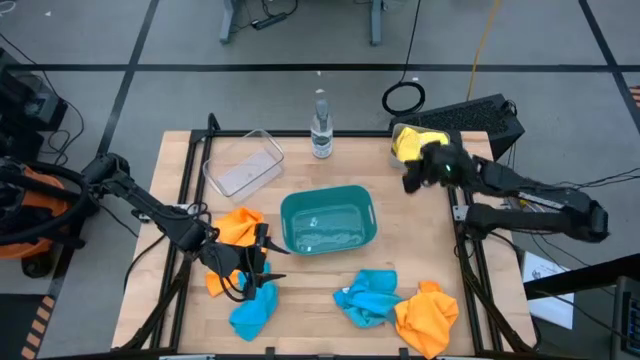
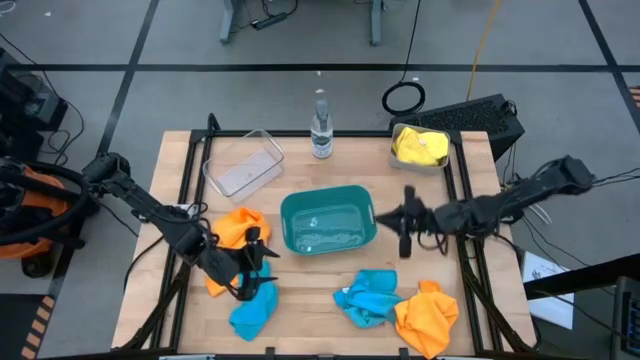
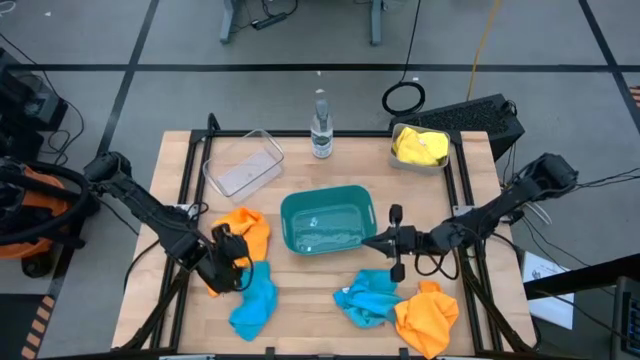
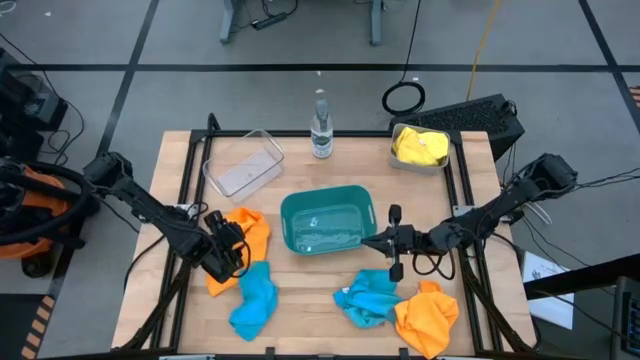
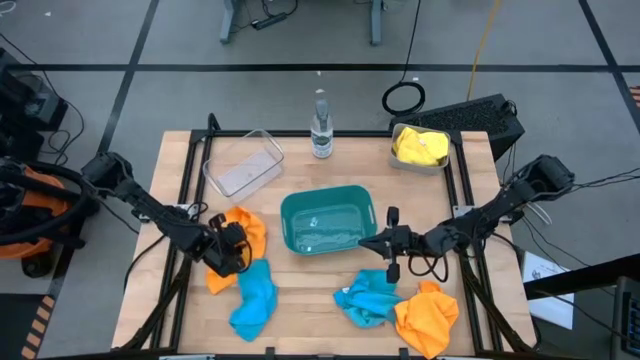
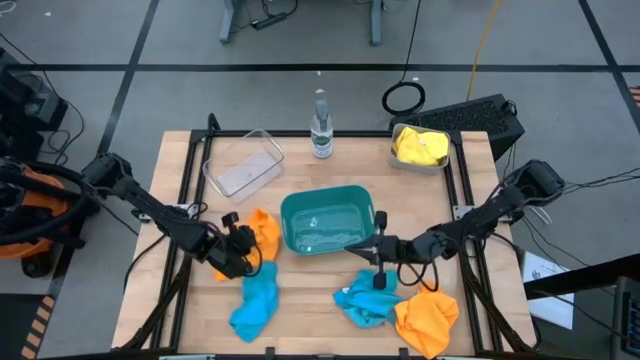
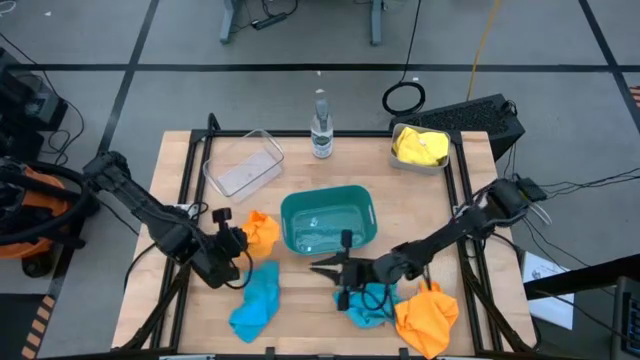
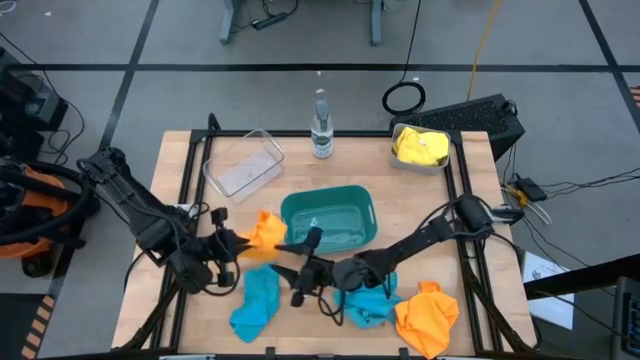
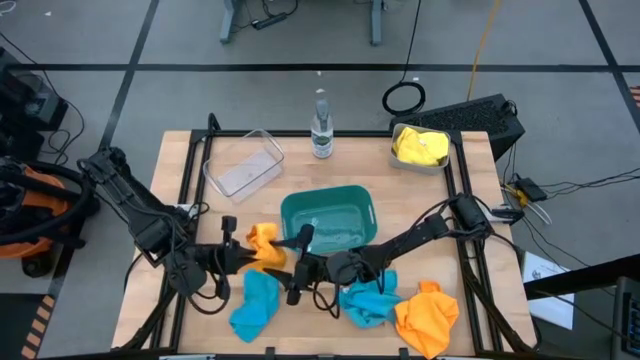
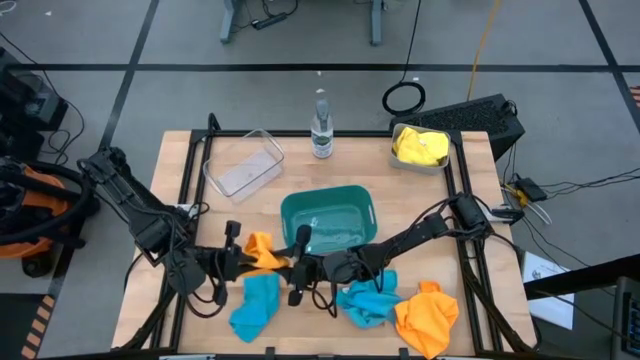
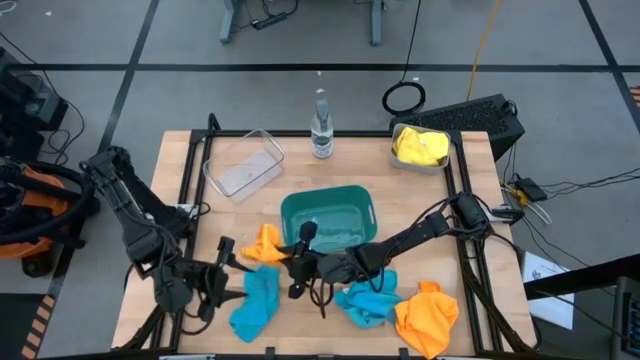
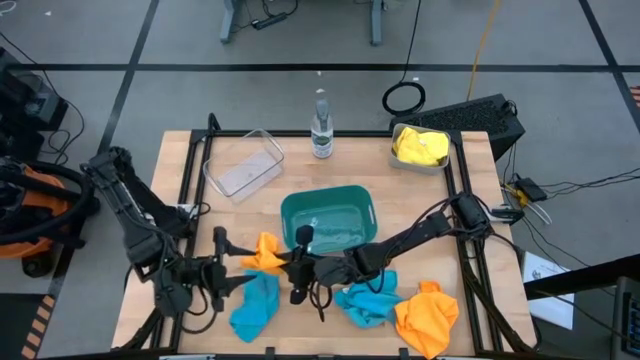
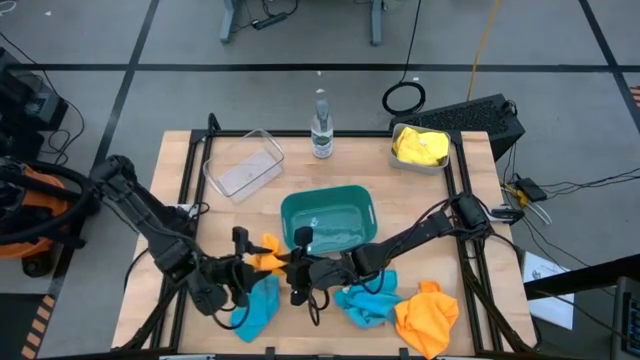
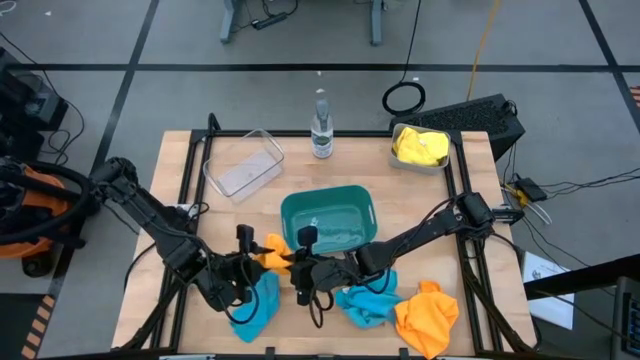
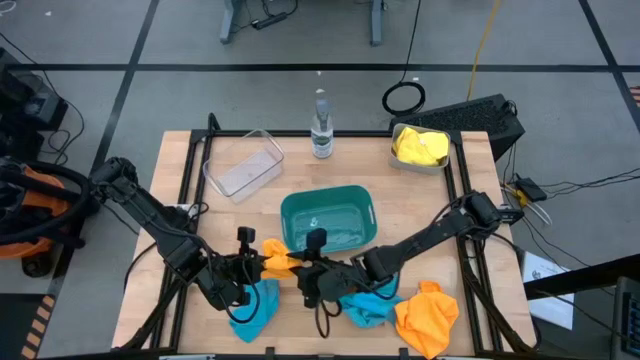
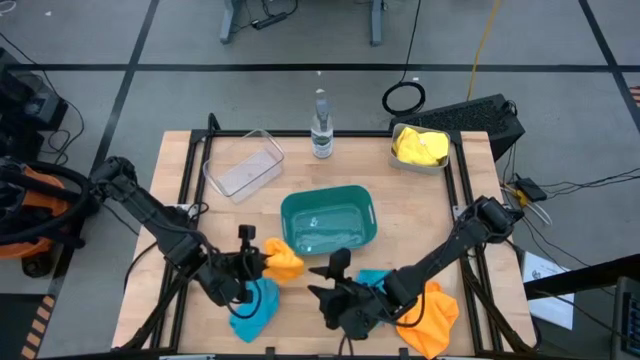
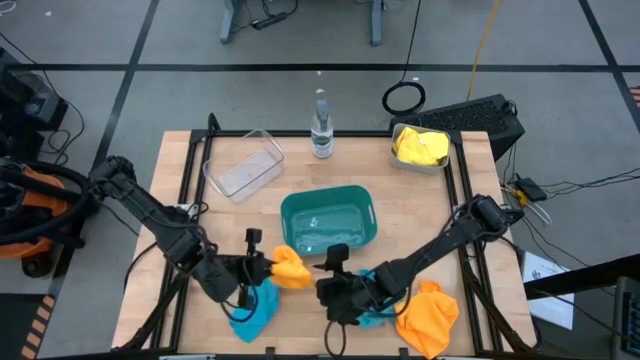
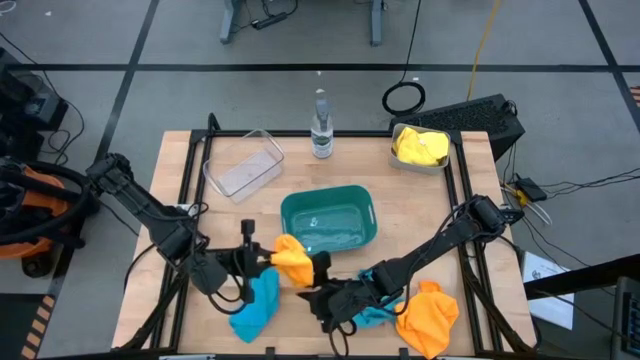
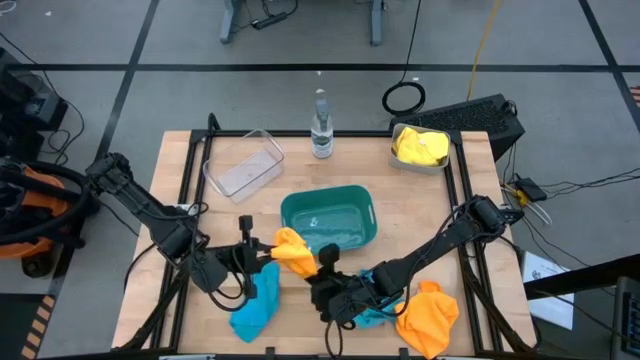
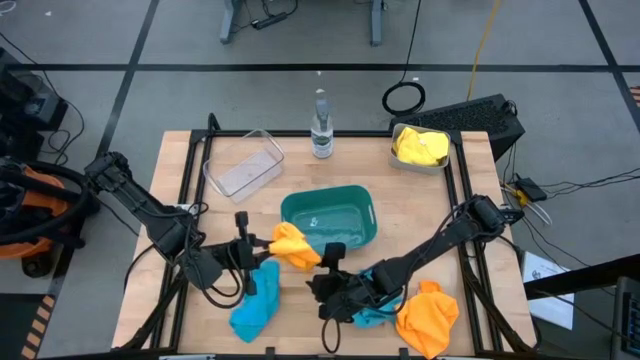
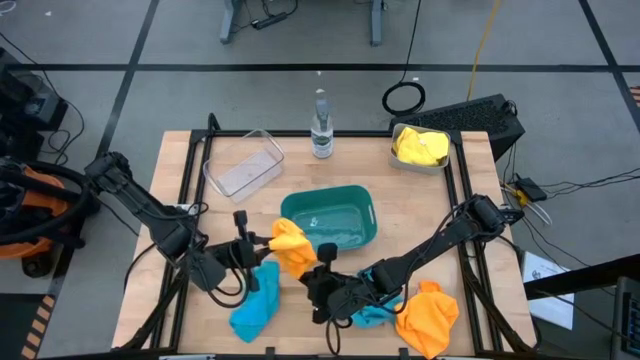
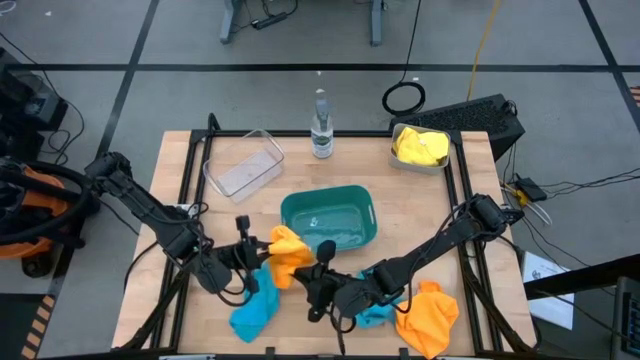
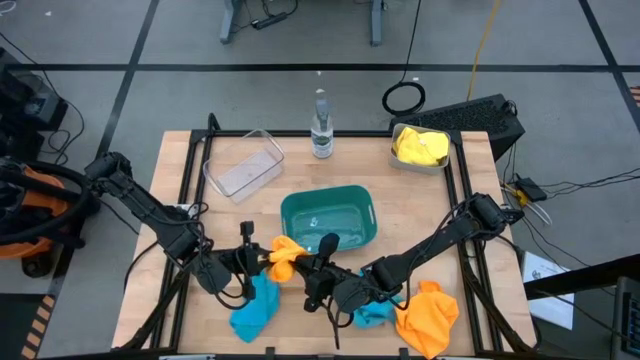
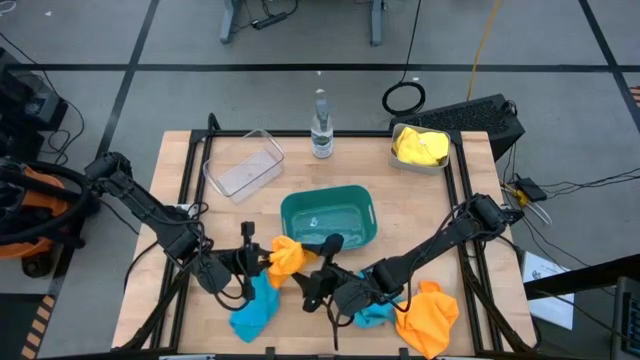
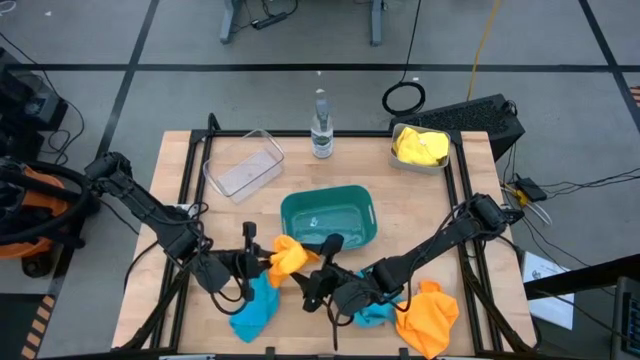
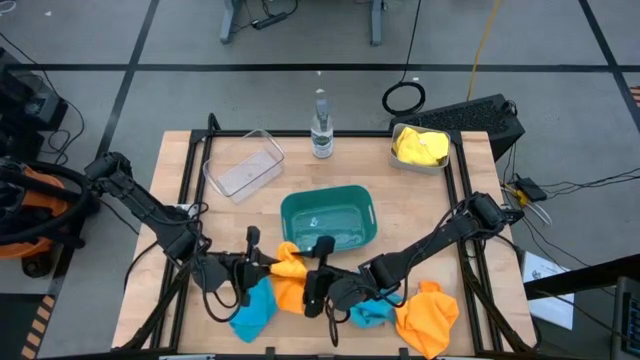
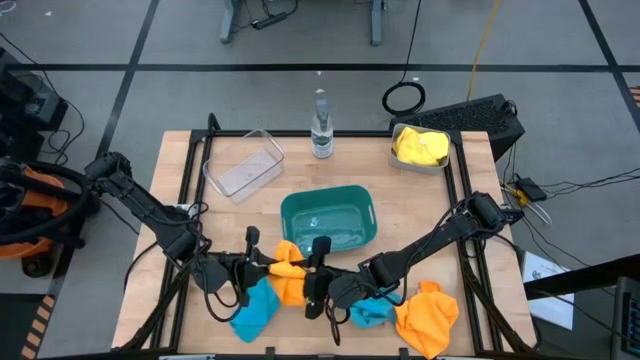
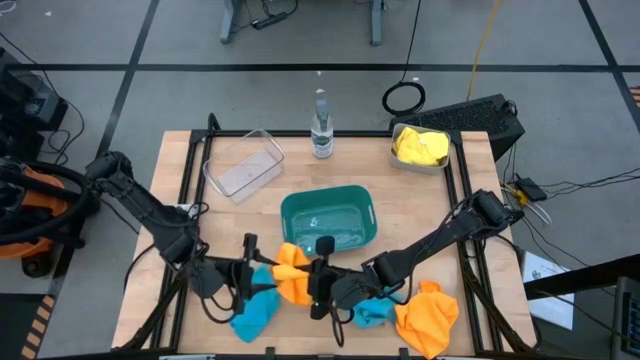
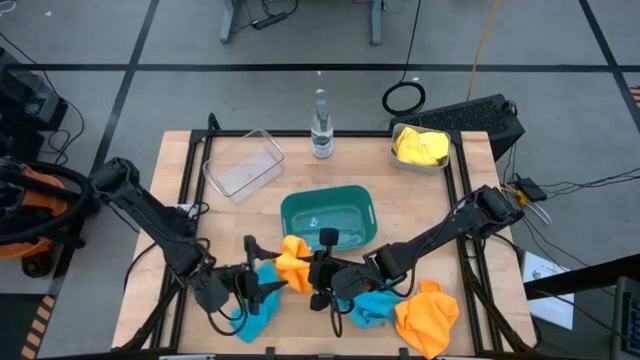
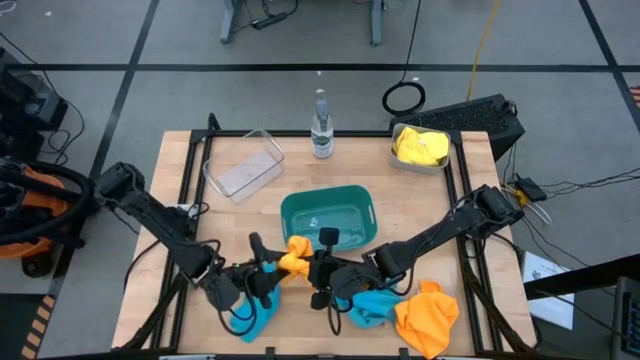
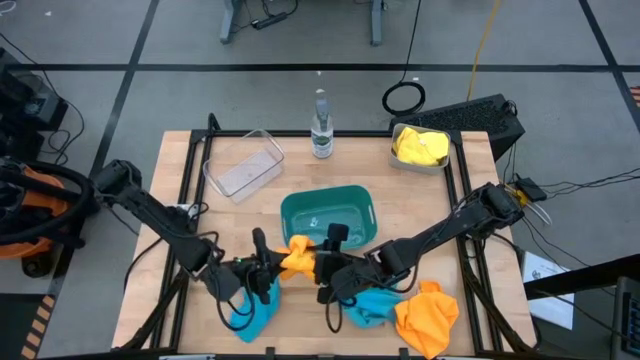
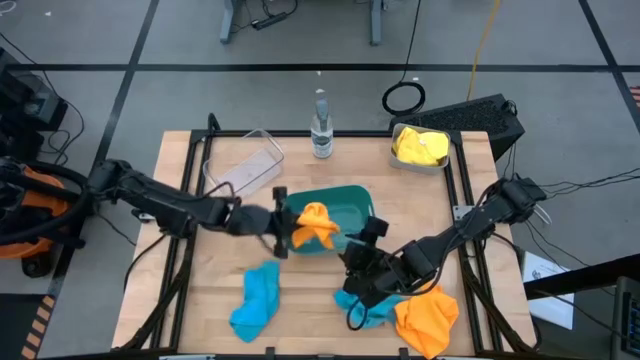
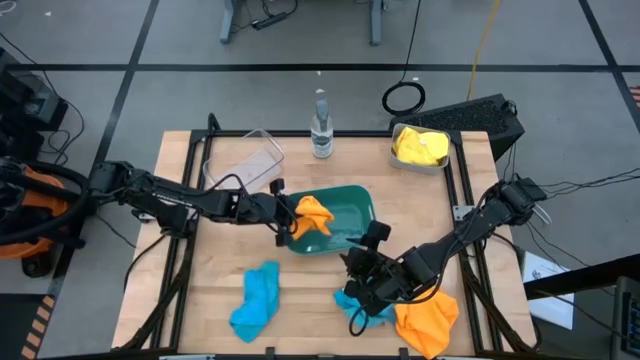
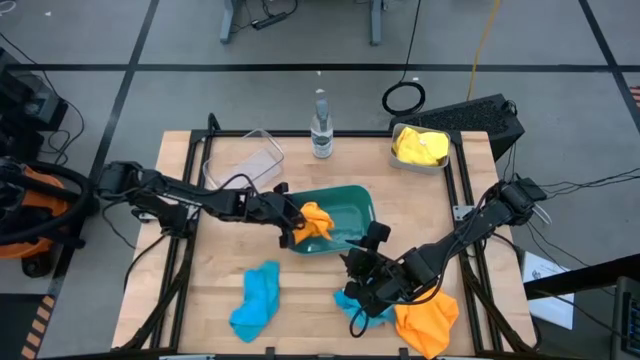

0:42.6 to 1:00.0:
Task: Sort microfiber towel by color & place in baskets
Put the top orange towel into the green bin

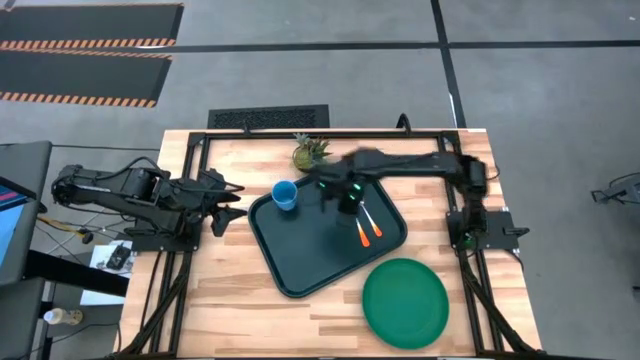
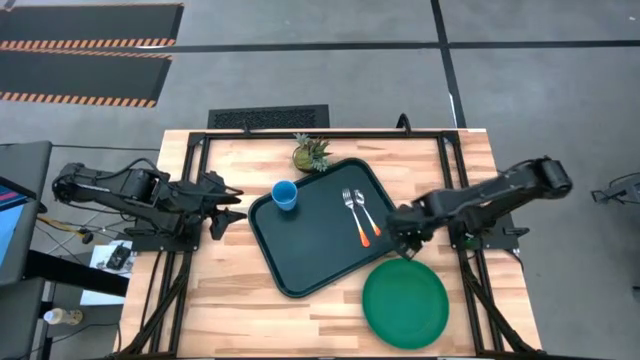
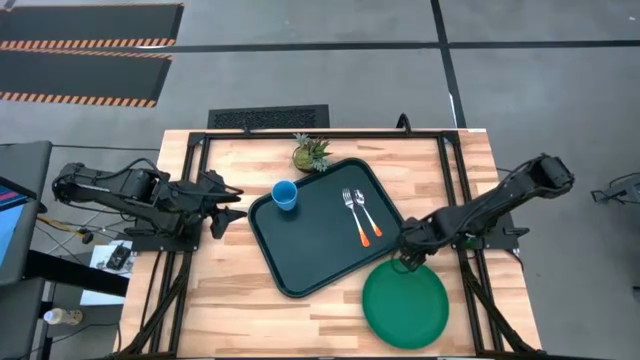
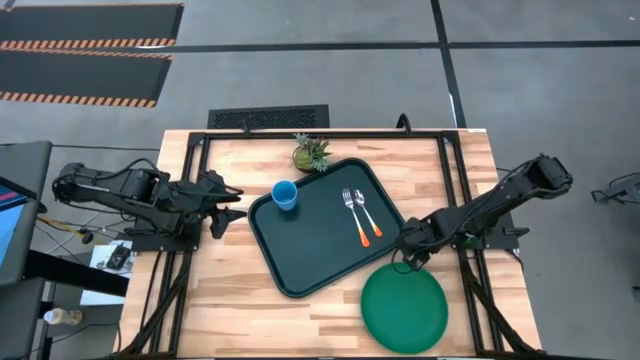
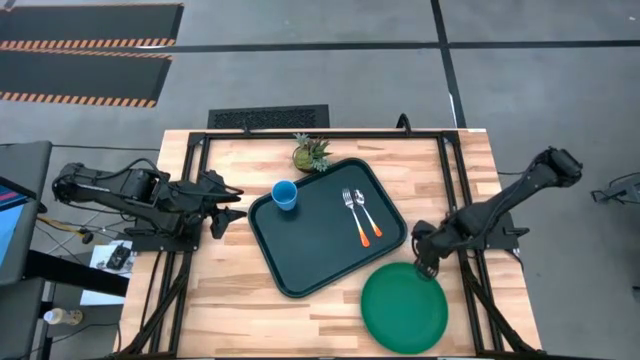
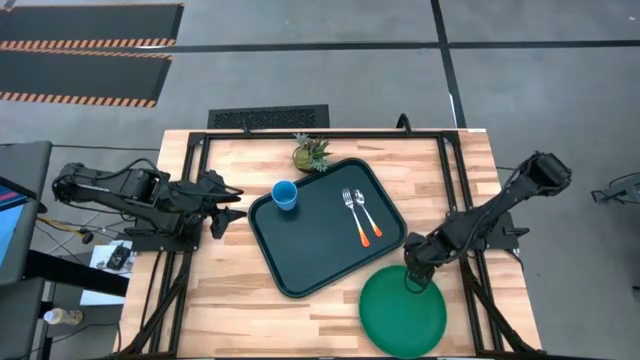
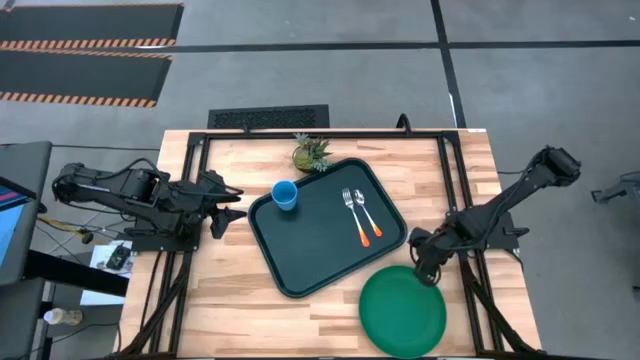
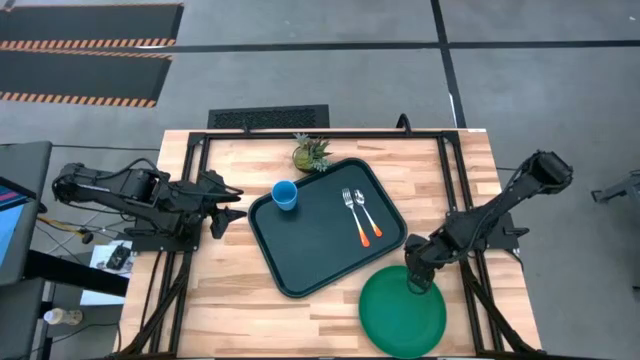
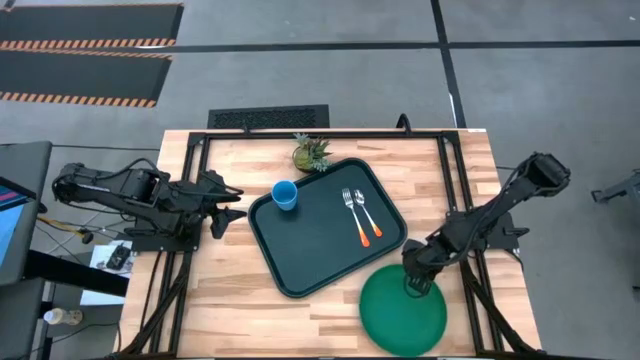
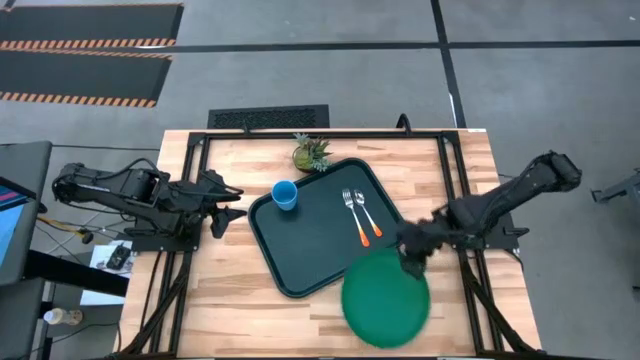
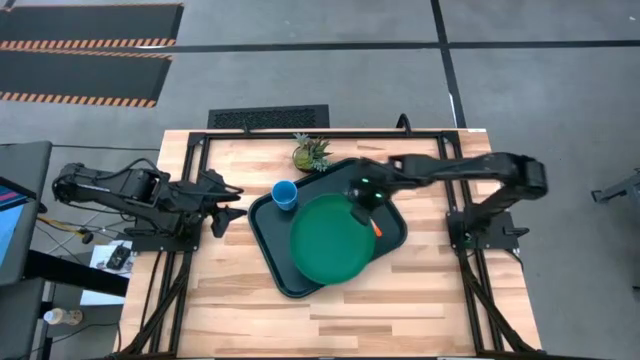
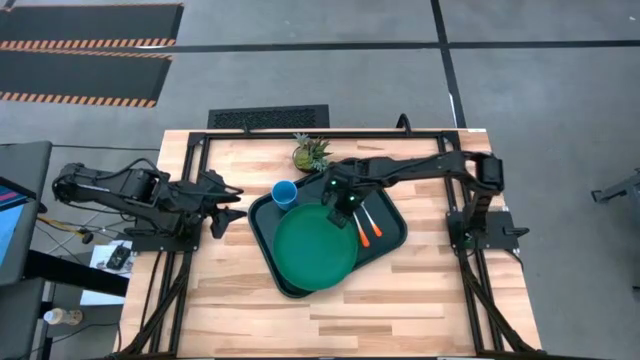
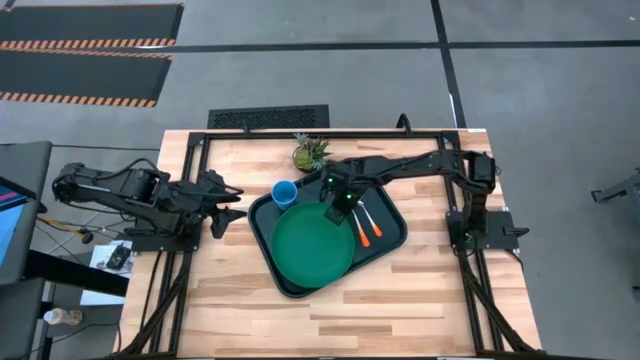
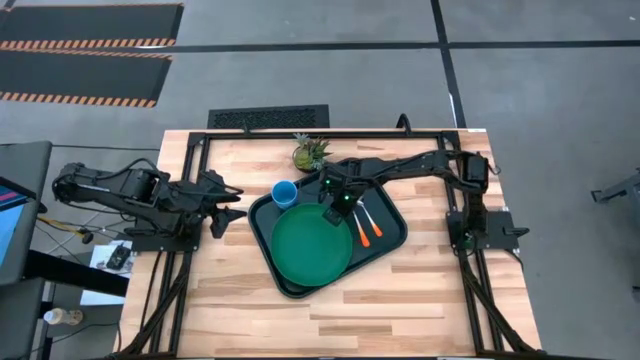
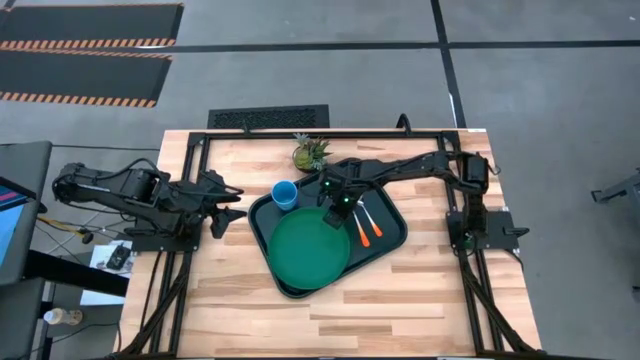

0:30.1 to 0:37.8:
Task: Pick and place plate/cup/fork/spoon on tray
Put the green plate on the black serving tray to the bottom of the blue cup
